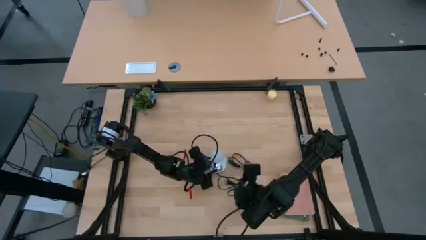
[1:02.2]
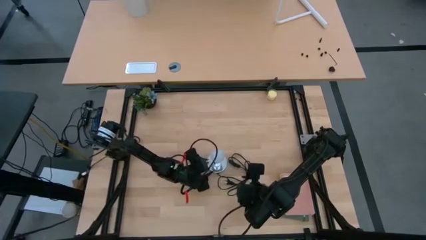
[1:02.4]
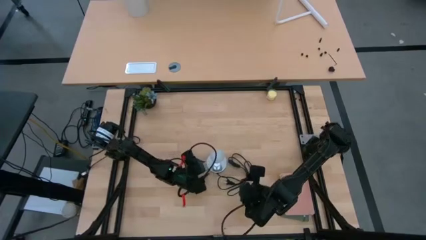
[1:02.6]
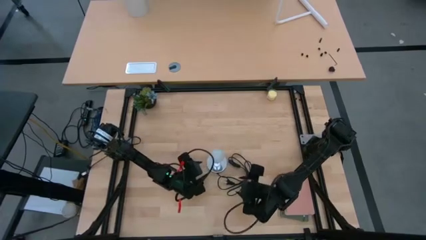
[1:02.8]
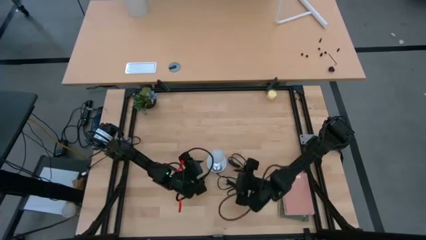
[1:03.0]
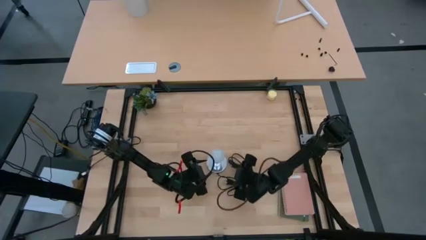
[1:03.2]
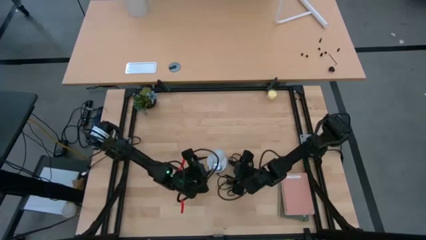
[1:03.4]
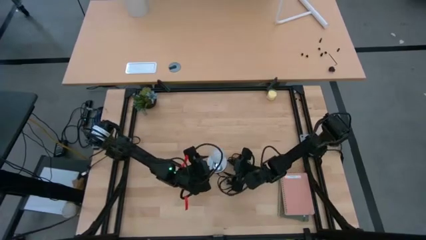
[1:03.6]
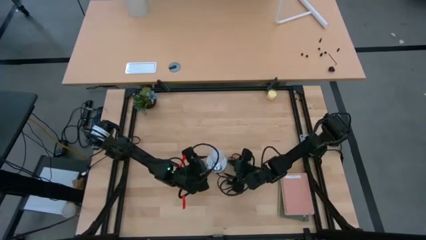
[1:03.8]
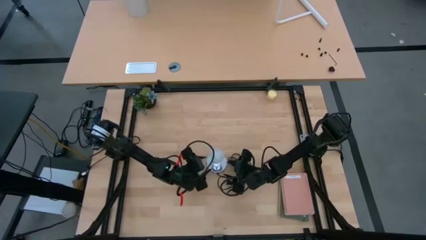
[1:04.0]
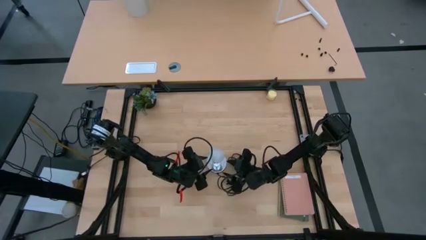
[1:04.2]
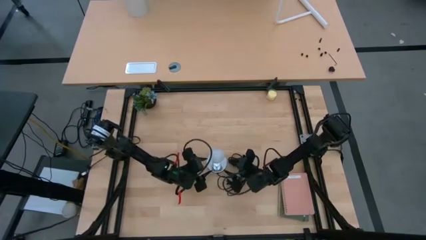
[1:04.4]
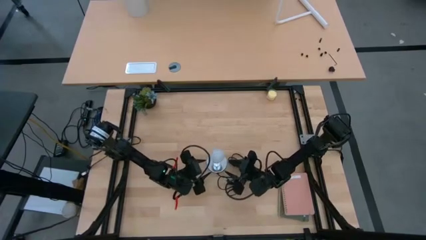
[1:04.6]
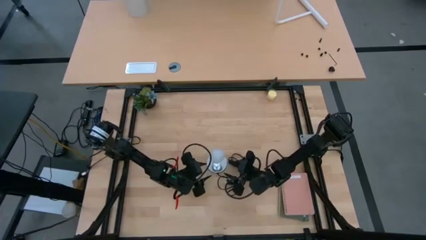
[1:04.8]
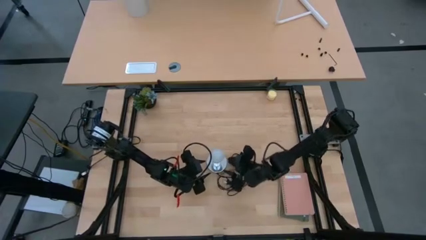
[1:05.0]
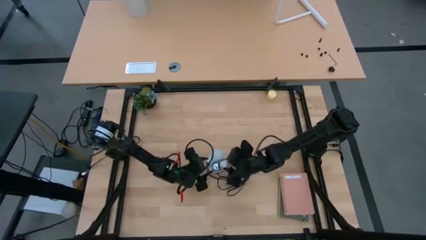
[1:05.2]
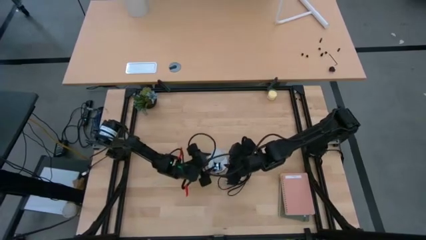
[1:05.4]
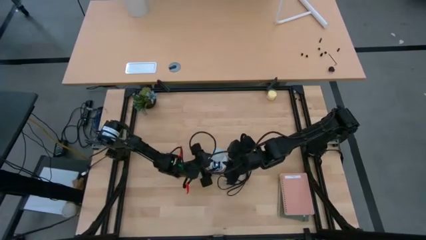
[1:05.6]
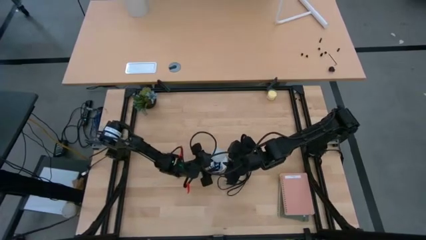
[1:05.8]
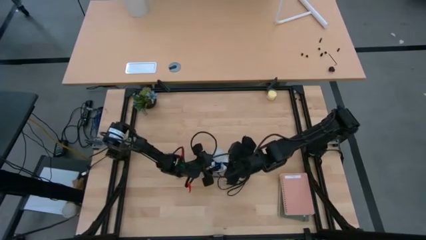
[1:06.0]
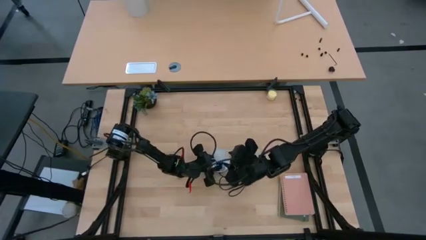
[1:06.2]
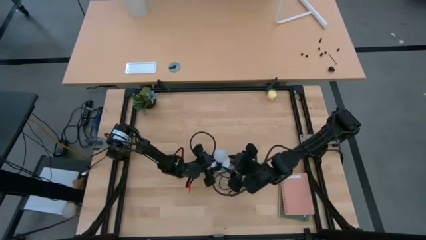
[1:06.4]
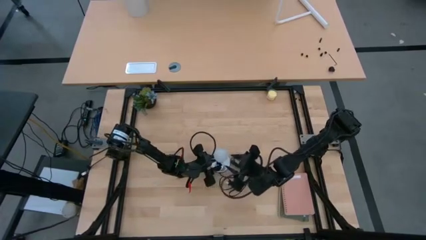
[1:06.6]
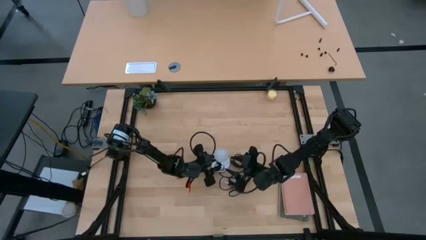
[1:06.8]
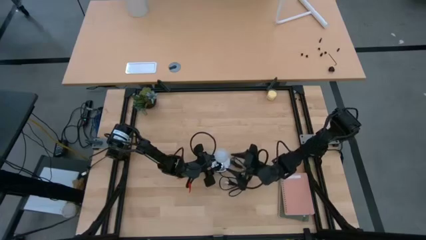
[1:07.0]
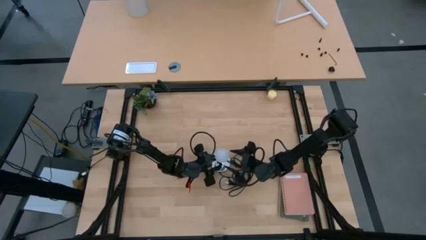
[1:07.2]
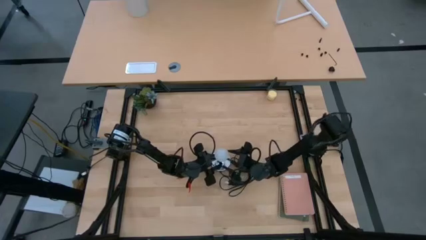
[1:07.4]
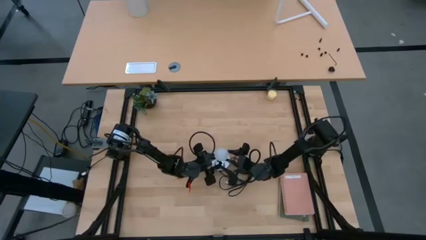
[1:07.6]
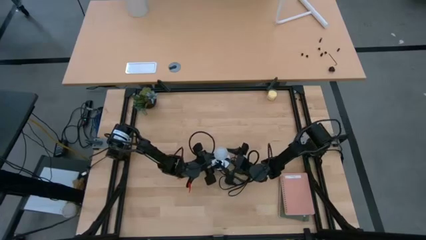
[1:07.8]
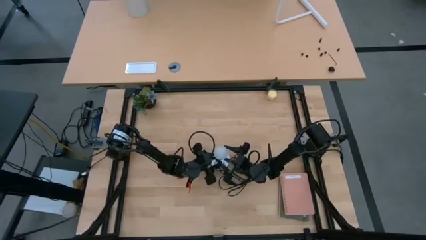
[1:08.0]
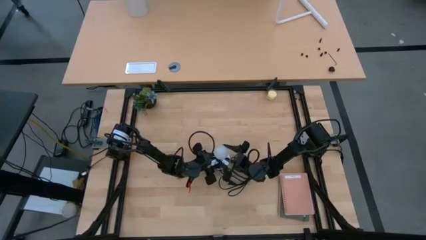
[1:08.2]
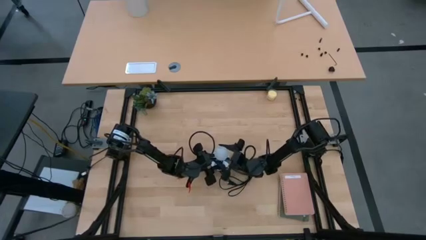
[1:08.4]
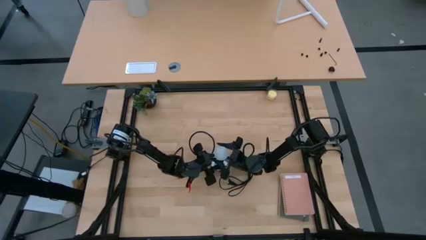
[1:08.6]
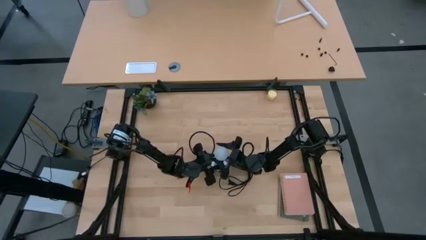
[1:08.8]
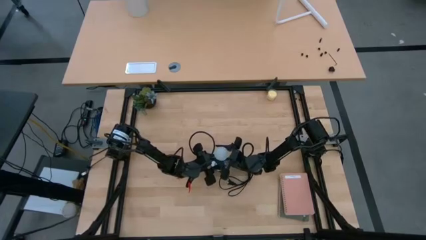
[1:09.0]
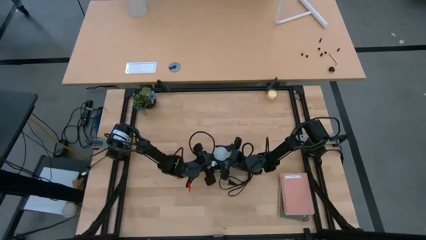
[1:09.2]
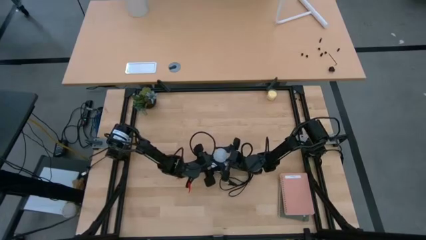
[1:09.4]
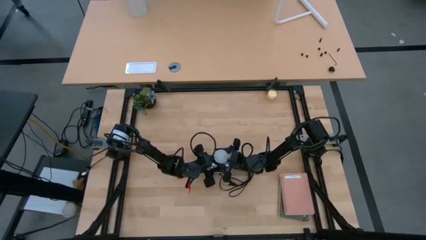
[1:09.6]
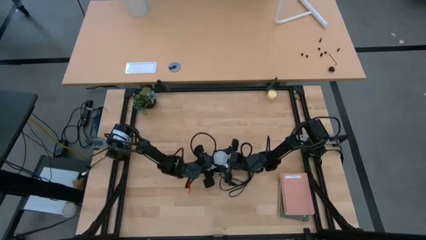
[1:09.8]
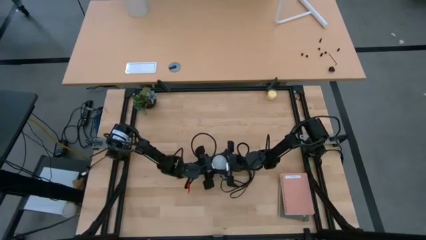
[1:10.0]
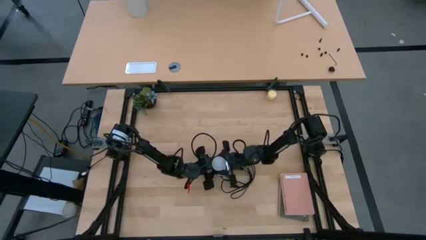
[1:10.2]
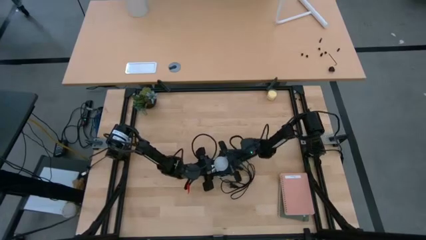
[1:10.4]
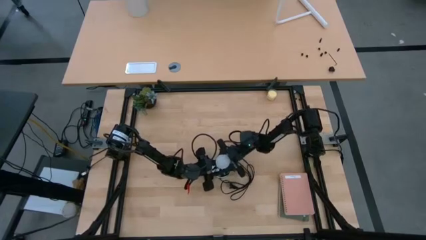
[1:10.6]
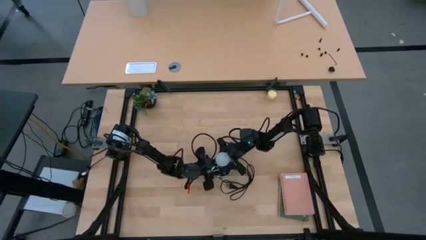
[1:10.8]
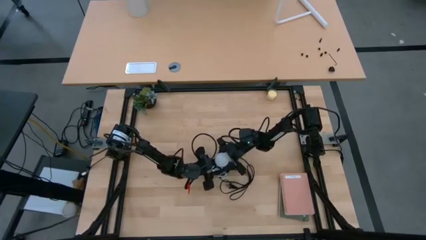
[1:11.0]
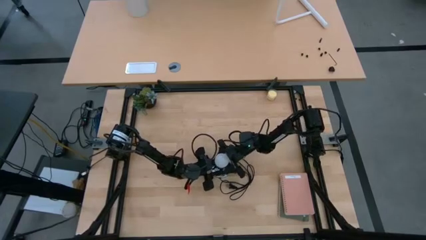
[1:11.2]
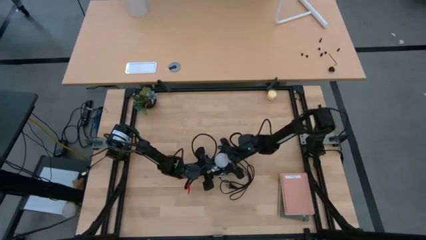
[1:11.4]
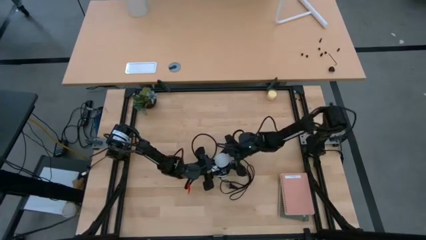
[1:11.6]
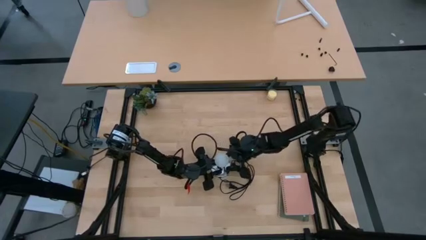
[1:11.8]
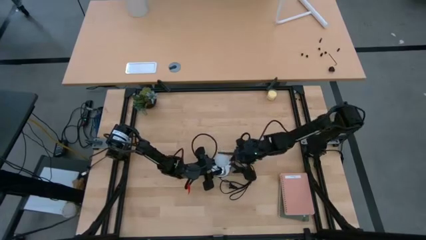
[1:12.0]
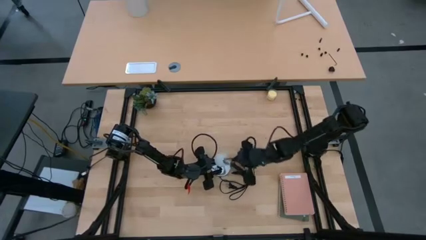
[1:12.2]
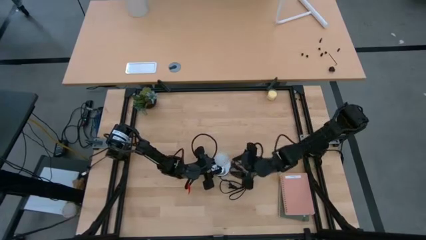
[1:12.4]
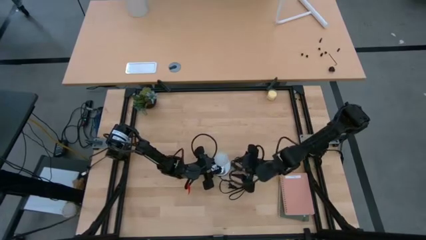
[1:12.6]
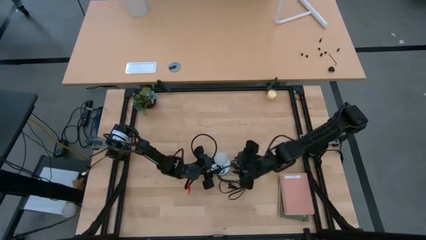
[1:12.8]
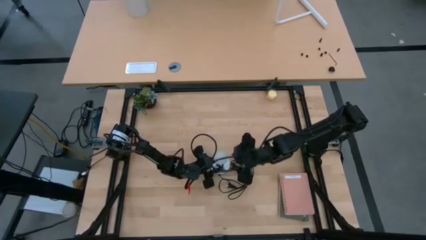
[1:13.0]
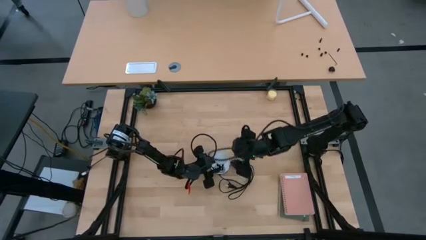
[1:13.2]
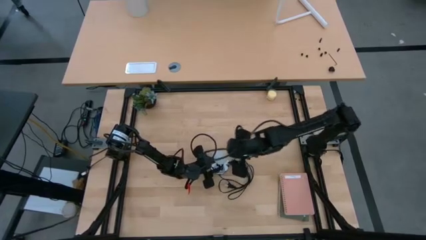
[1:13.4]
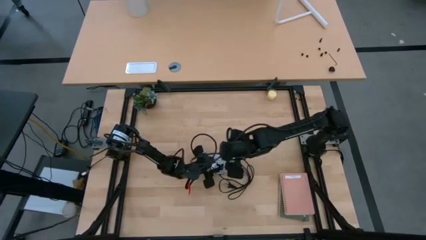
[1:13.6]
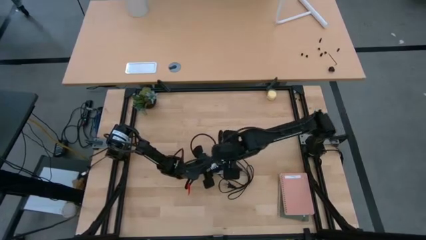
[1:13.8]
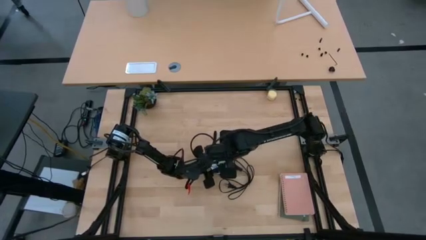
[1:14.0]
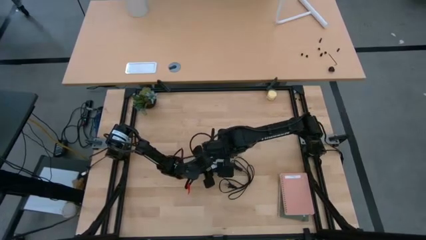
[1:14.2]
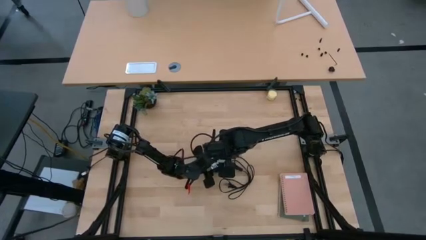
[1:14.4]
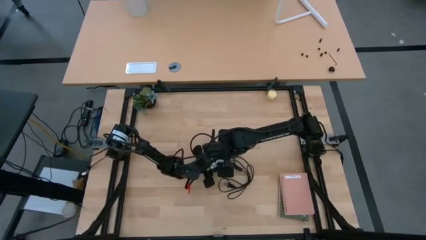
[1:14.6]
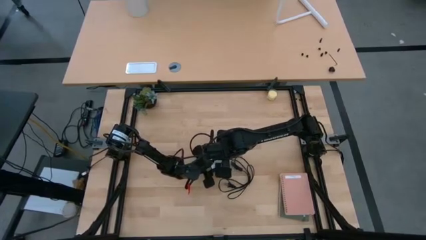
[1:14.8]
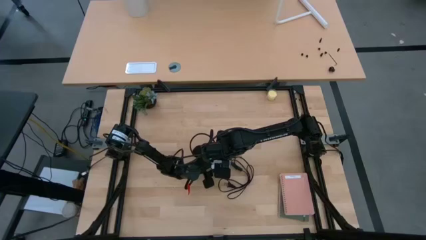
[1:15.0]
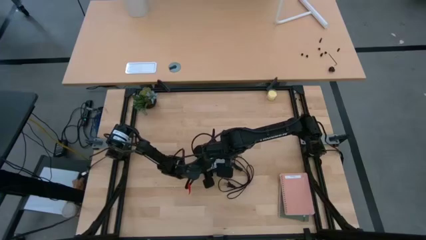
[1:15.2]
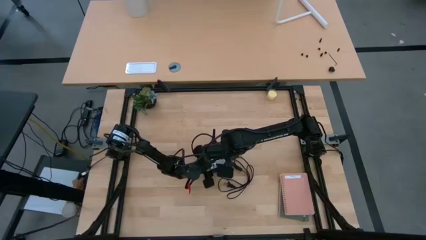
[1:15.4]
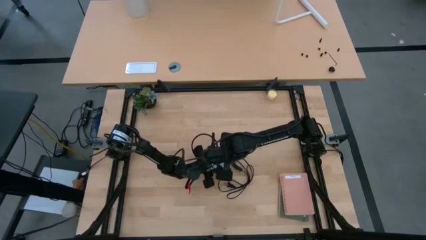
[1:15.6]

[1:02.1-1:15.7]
Task: Screw lightbulb
Remove the light bulb from the lamp

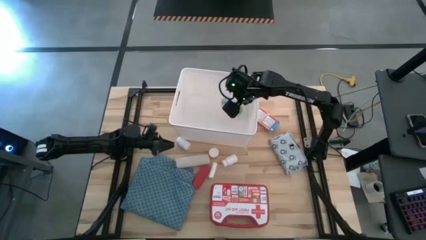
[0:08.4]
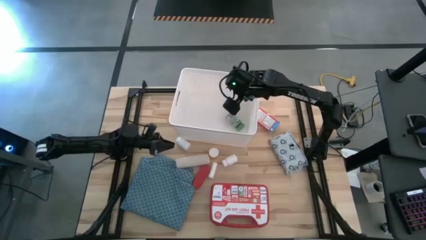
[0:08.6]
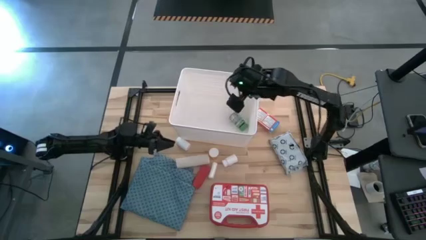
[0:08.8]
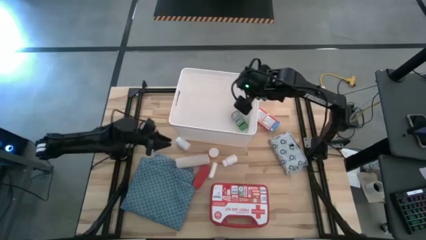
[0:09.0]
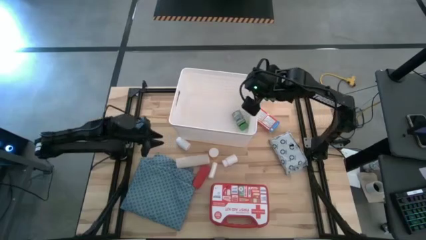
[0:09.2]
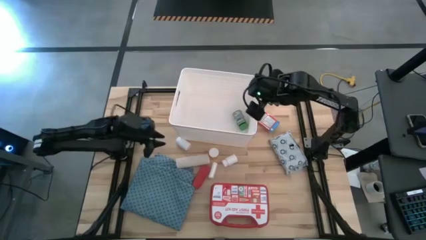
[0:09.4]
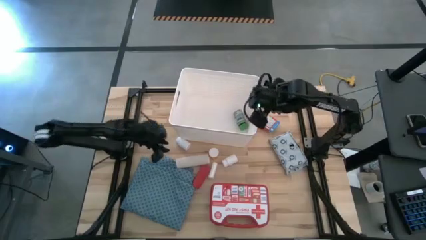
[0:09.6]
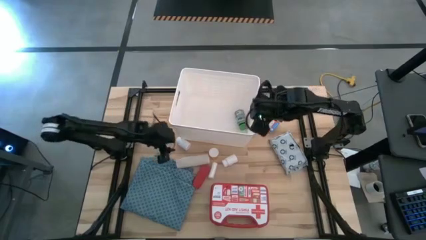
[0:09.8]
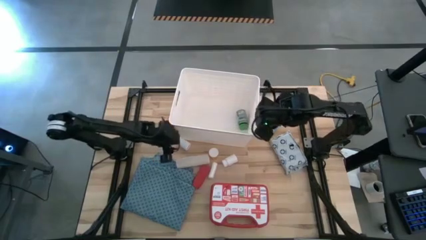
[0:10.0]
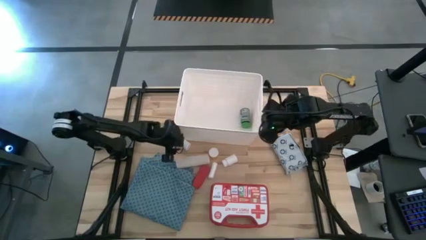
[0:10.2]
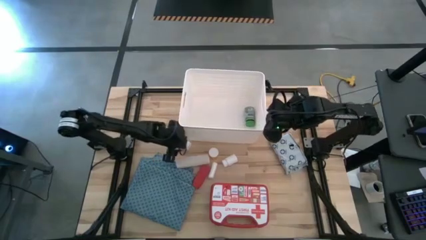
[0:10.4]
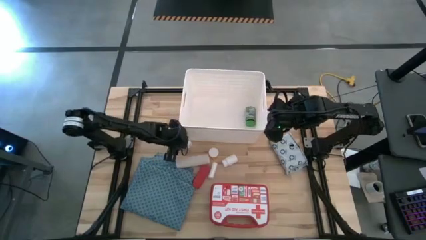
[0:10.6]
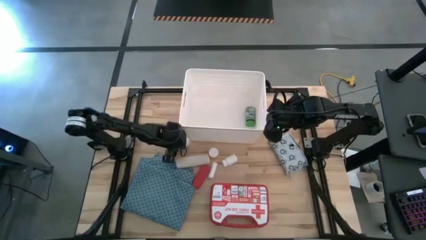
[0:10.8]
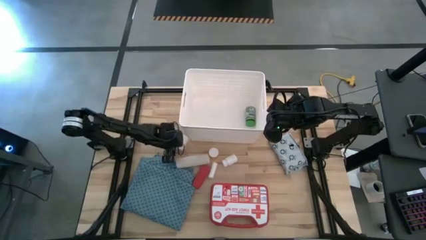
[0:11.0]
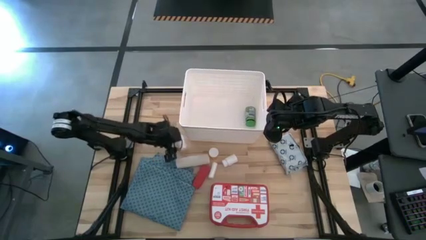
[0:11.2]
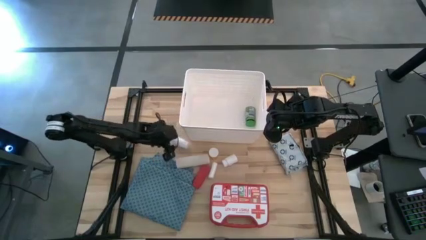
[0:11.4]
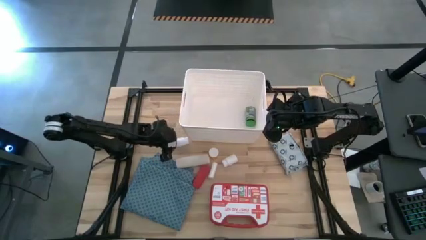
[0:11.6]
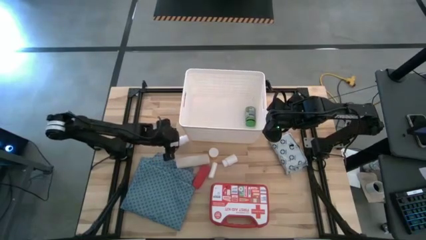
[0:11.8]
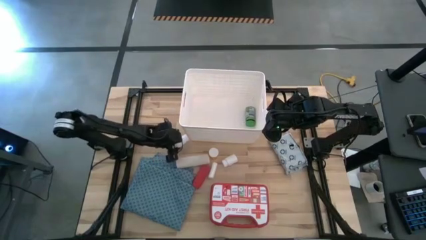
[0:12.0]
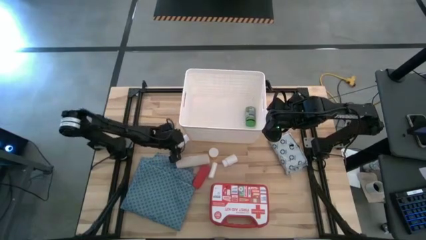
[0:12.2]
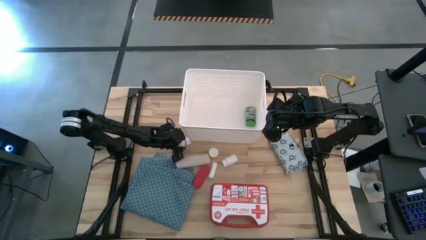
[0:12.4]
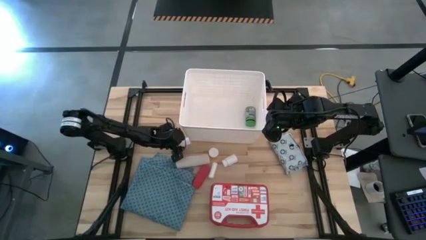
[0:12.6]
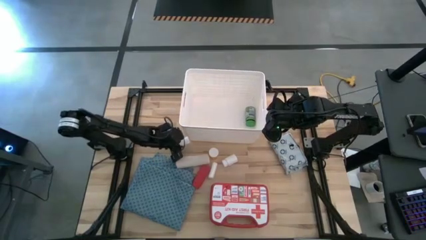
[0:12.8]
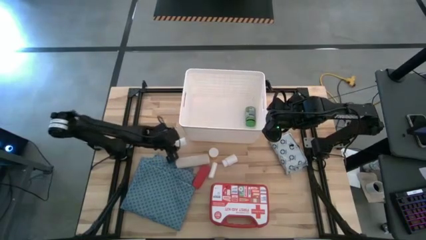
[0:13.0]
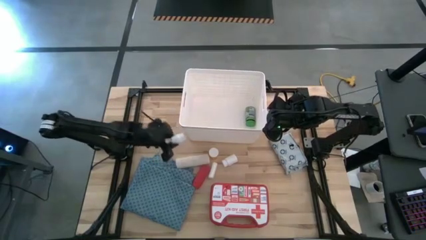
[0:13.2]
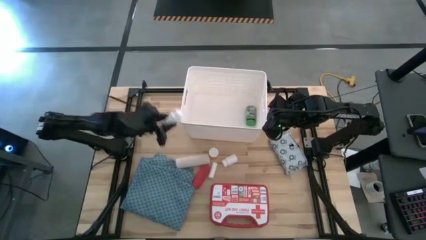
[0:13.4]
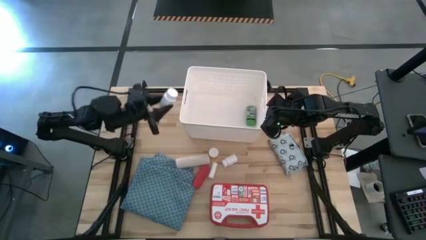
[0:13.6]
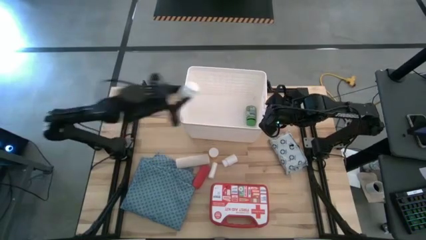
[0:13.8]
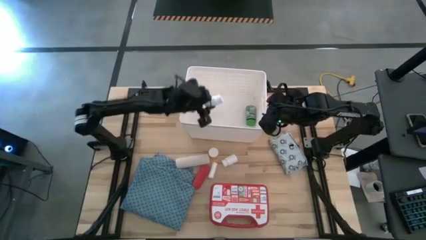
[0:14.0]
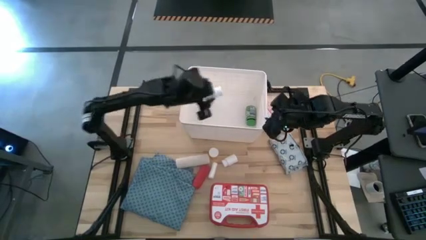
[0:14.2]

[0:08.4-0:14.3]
Task: Pick & place medical supplies in basket/bin
Put the left white pill bottle into the white bin
